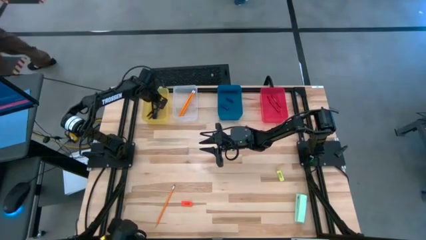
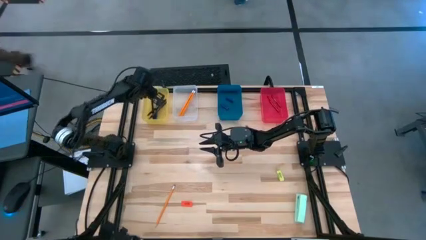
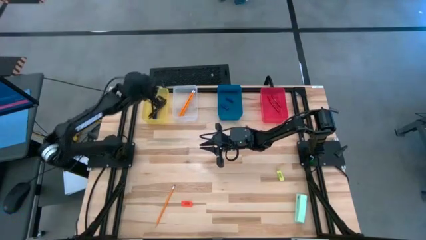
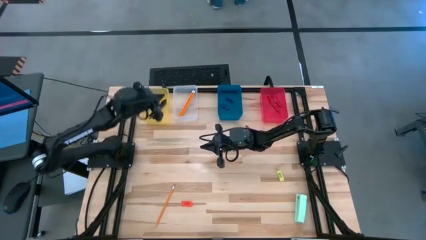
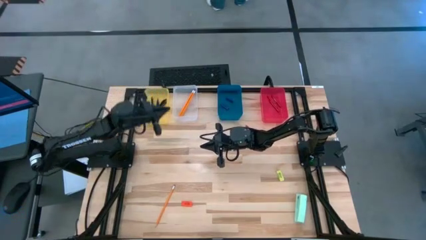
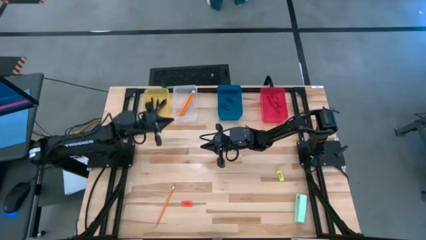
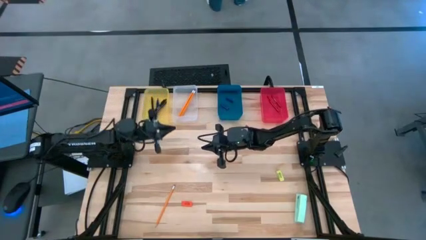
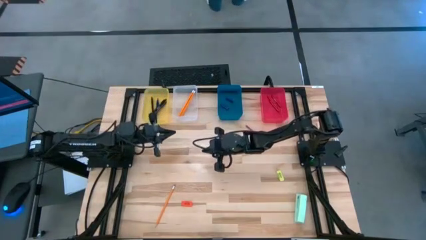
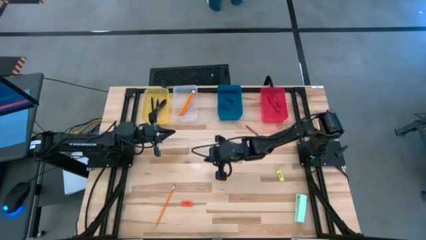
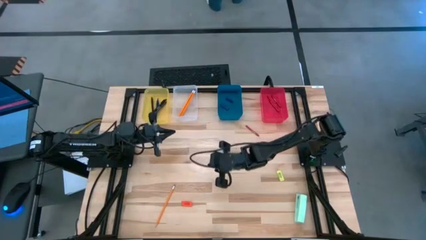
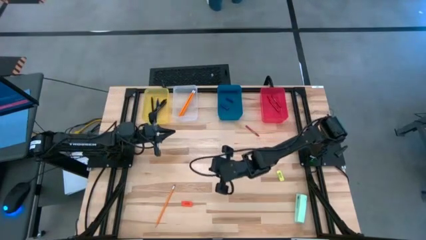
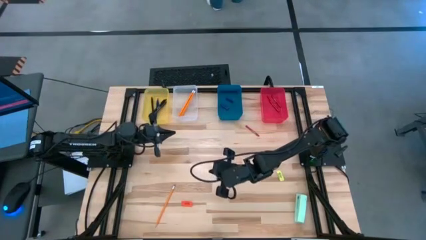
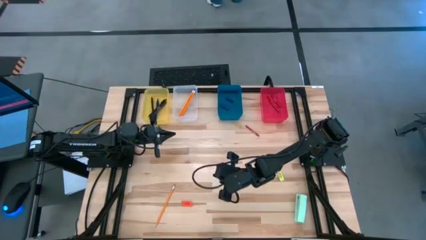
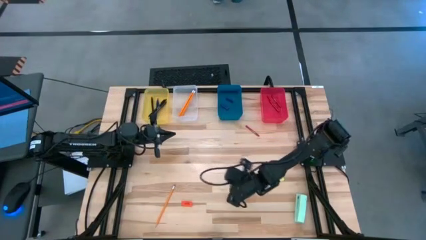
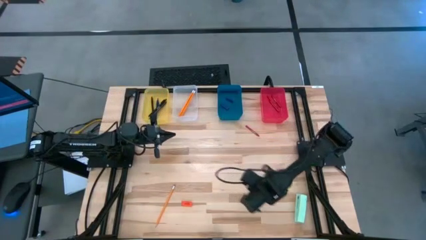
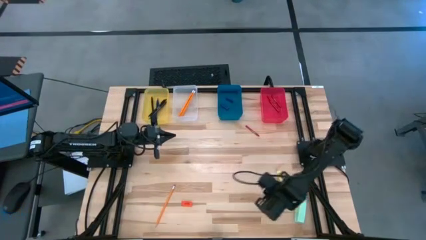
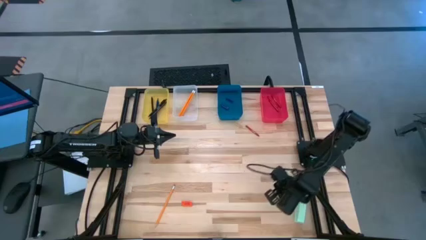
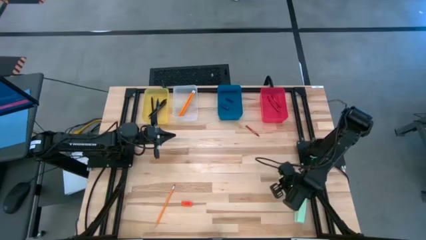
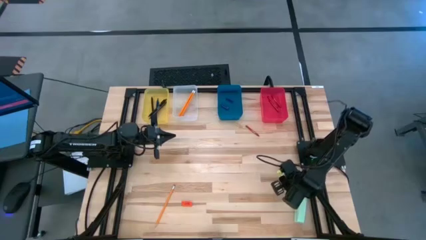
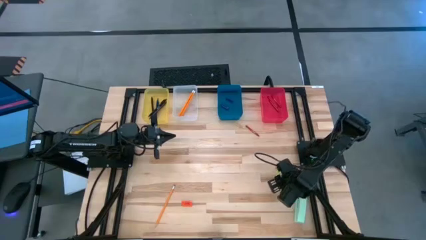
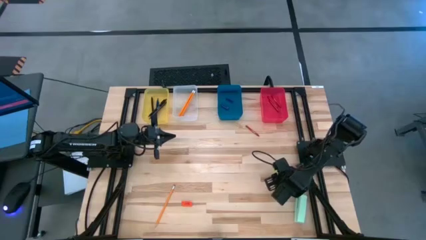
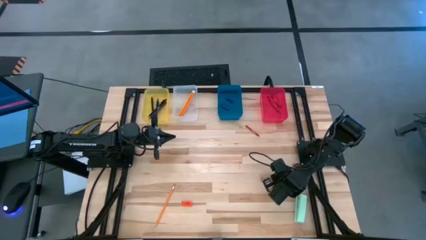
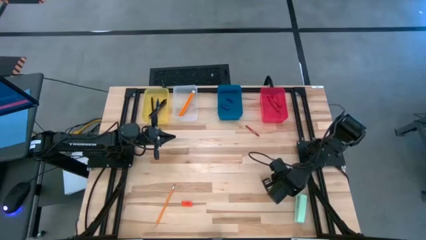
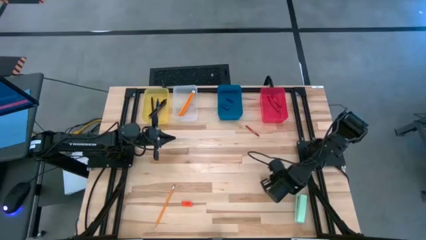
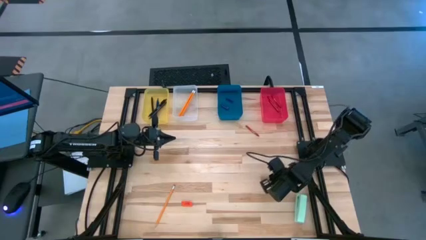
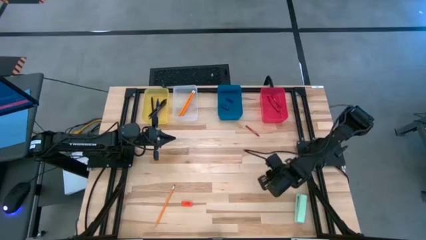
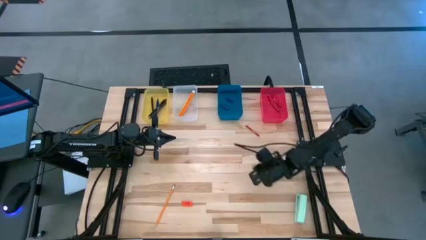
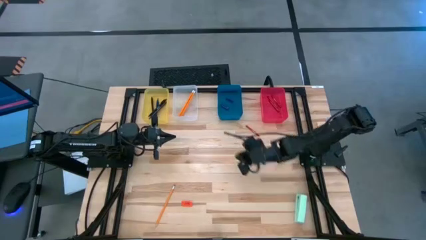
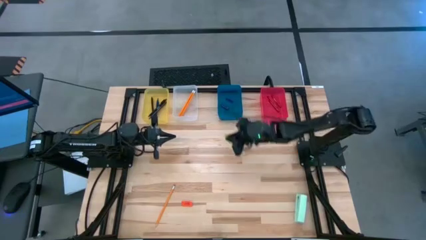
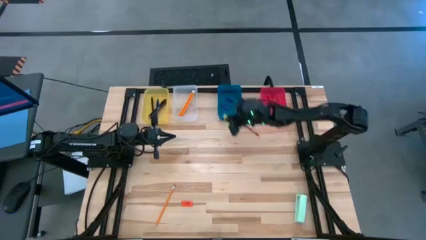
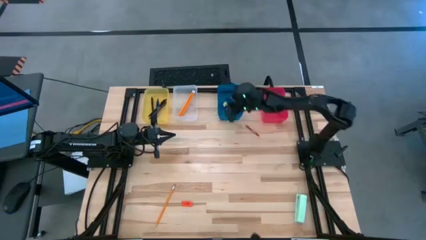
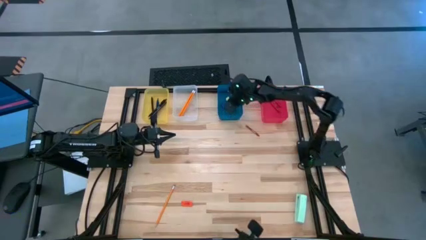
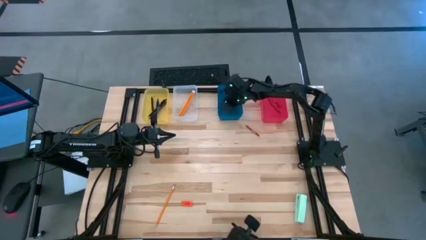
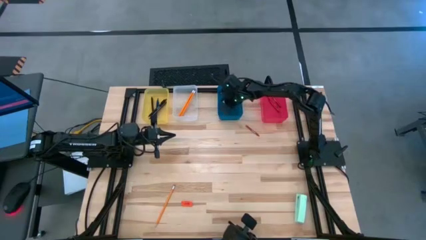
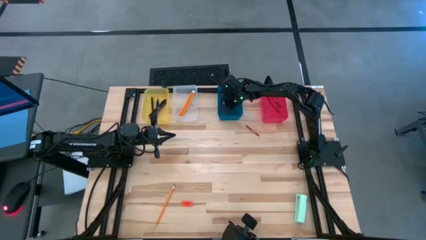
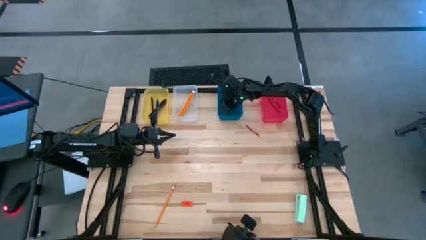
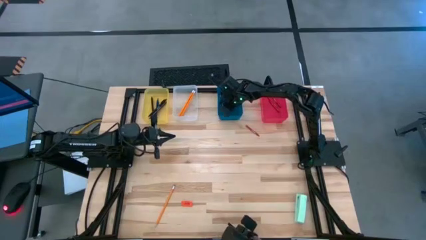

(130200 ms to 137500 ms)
Task: Sort crayons/erasers/pens/pencils in bins
Put the yellow eraser into the blue bin

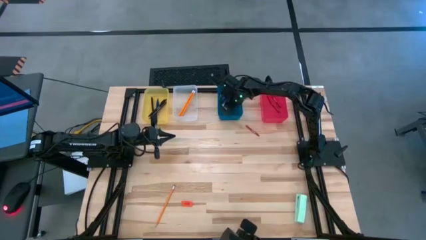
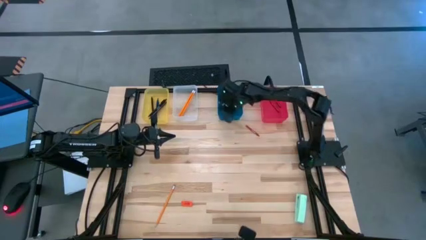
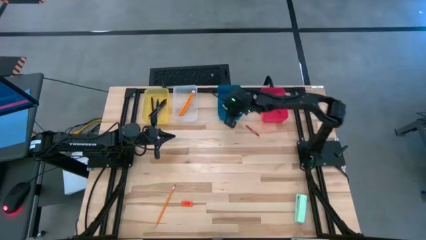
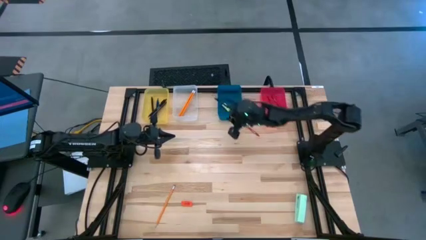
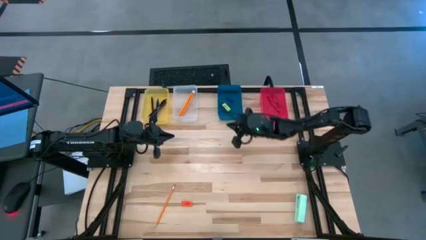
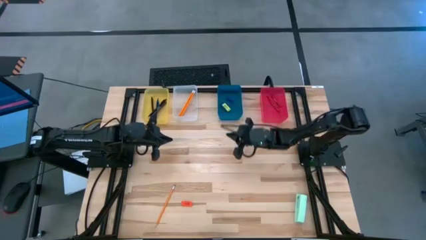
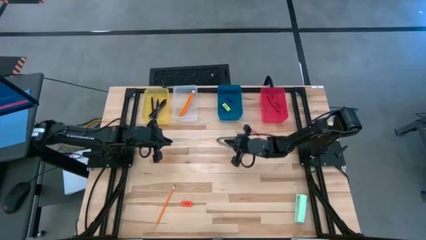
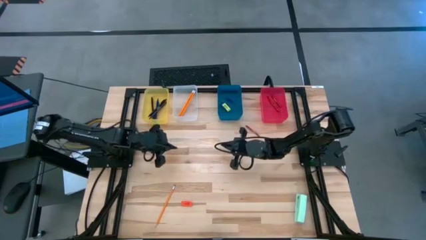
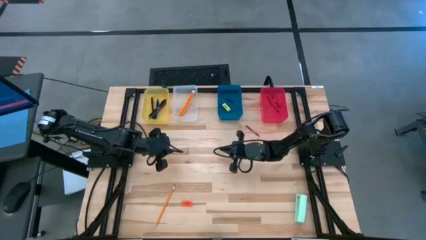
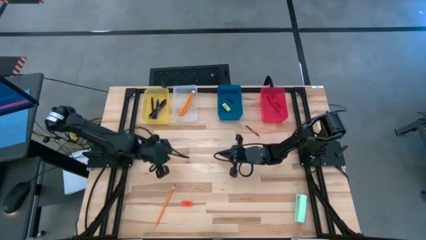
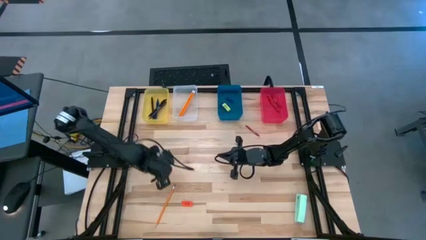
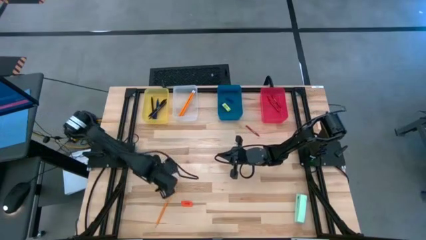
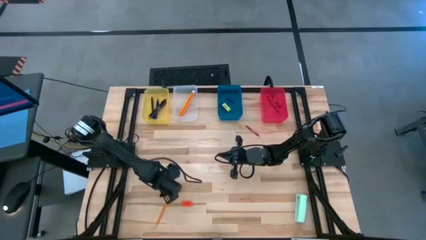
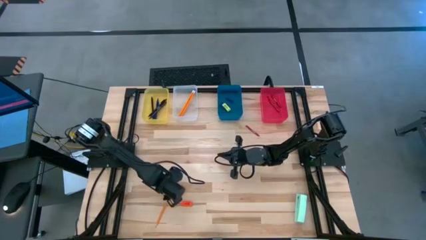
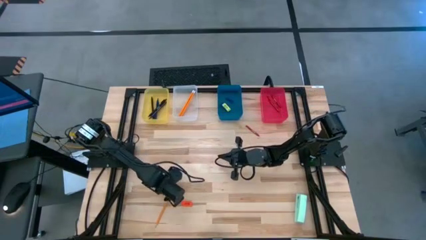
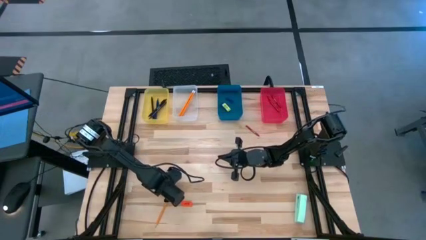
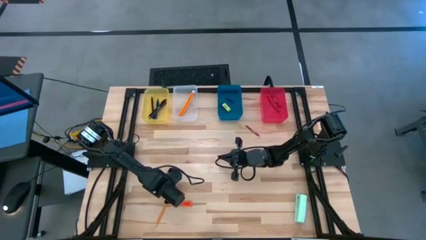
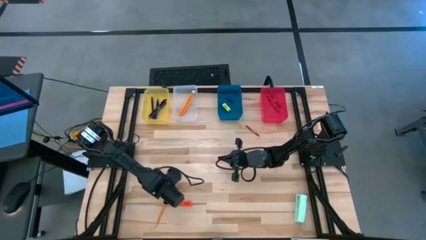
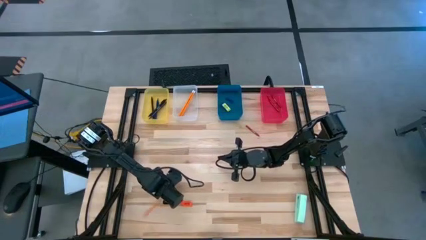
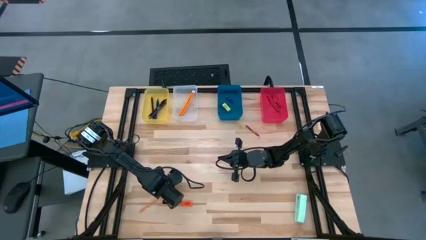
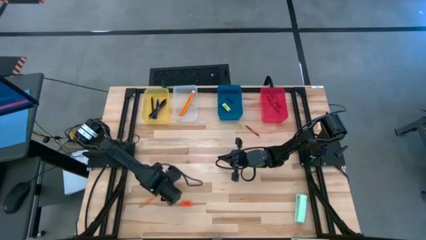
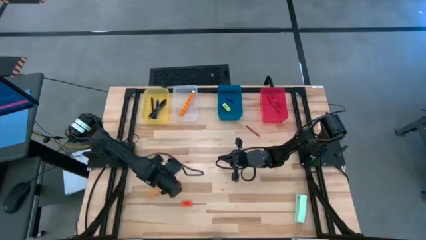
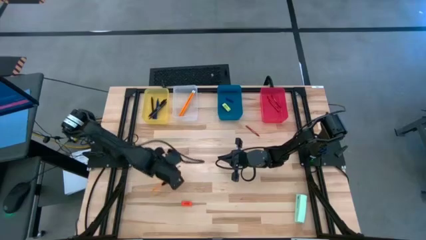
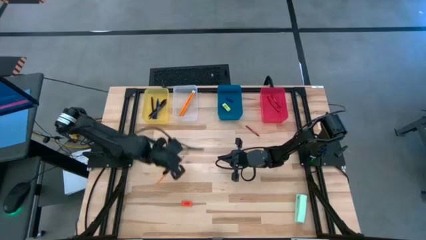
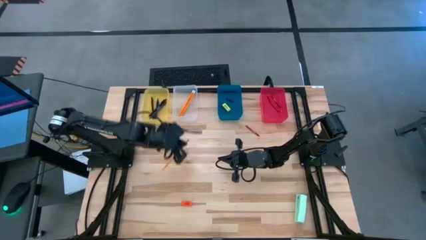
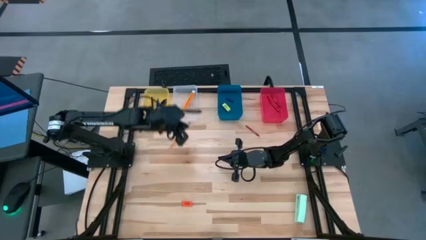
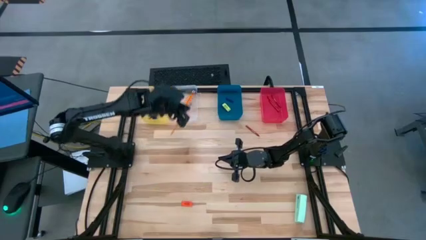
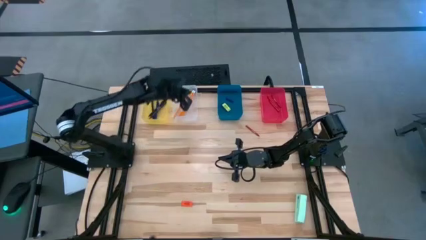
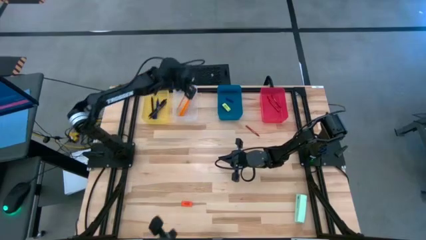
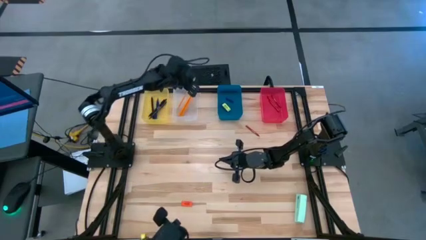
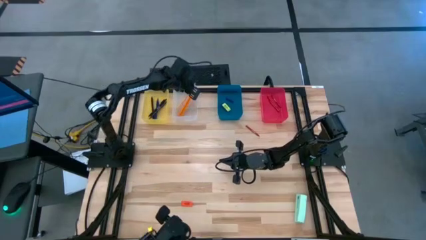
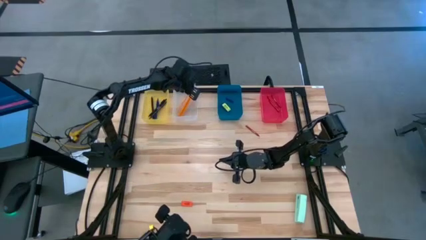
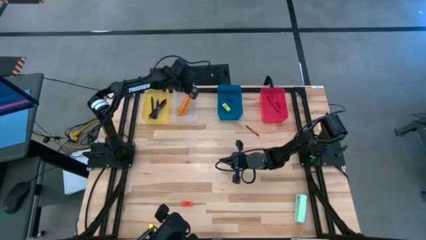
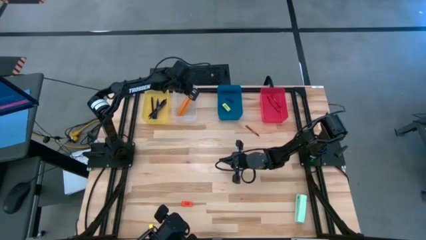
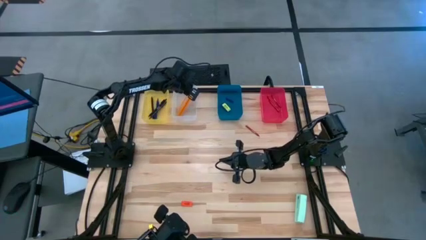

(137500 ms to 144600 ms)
Put the orange pencil into the transparent bin
